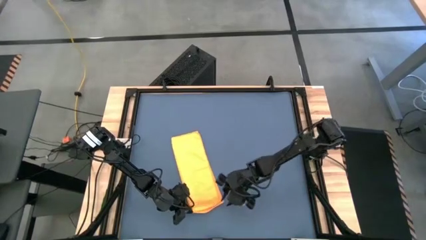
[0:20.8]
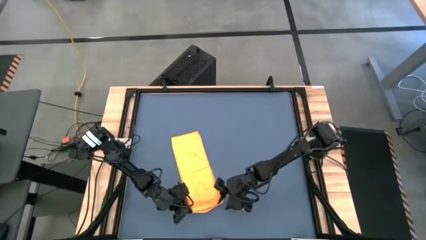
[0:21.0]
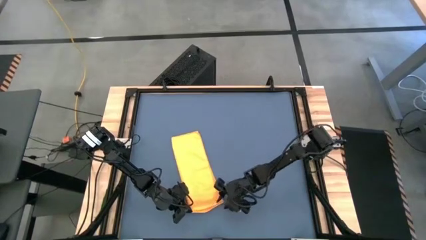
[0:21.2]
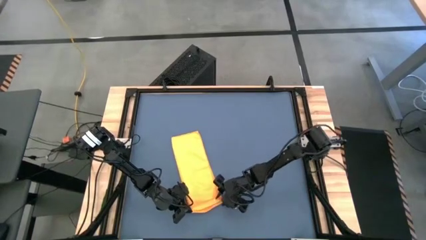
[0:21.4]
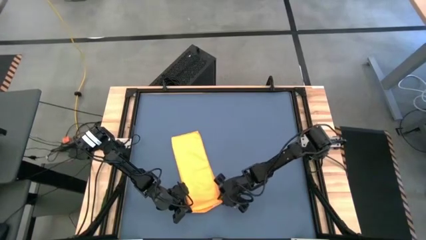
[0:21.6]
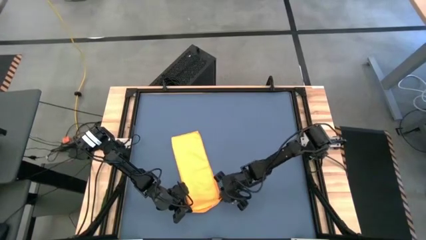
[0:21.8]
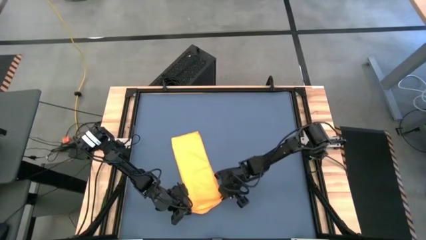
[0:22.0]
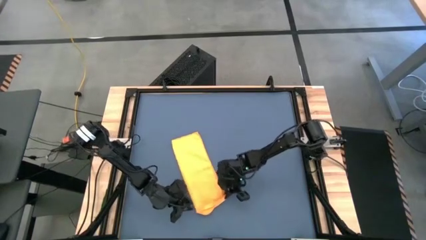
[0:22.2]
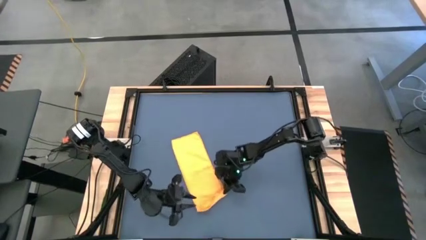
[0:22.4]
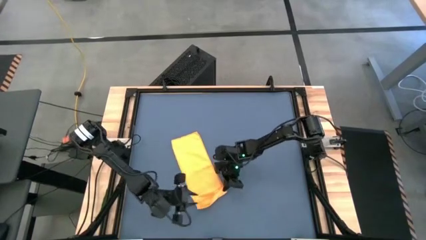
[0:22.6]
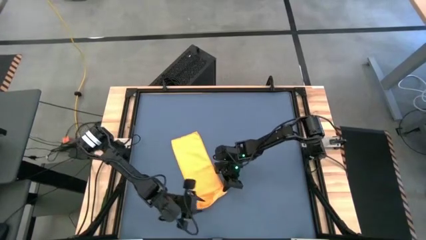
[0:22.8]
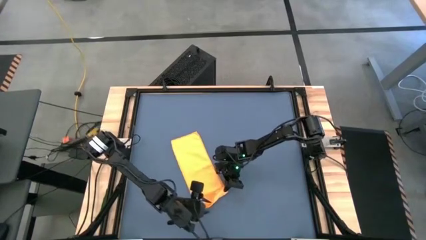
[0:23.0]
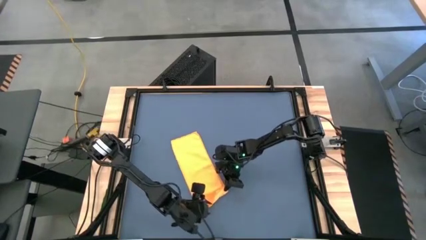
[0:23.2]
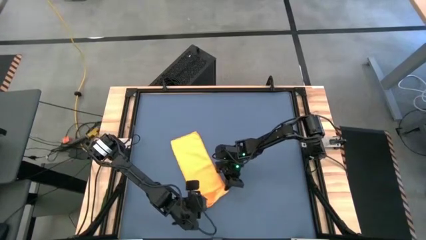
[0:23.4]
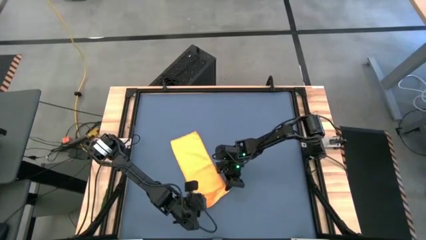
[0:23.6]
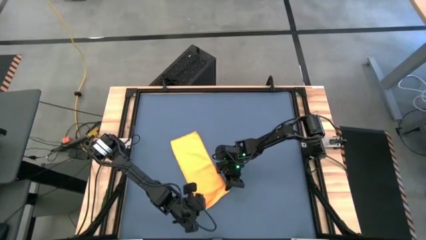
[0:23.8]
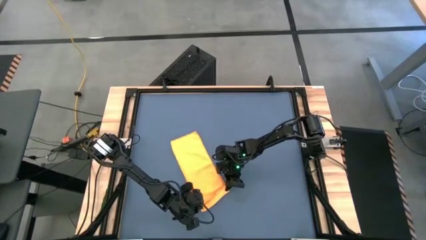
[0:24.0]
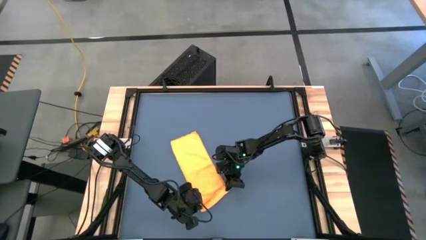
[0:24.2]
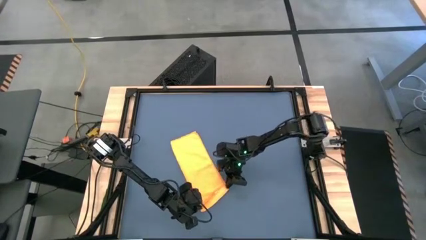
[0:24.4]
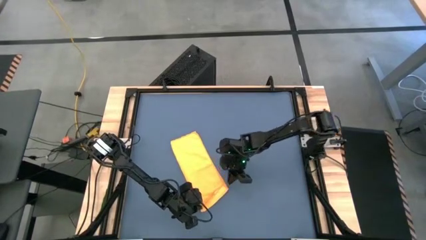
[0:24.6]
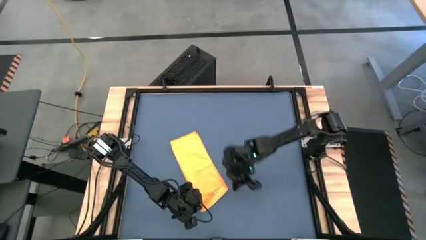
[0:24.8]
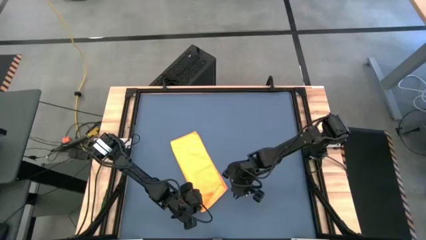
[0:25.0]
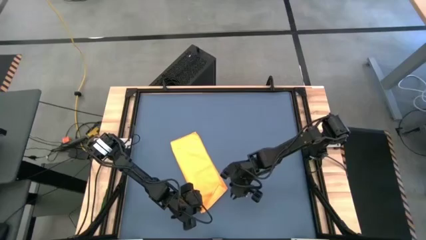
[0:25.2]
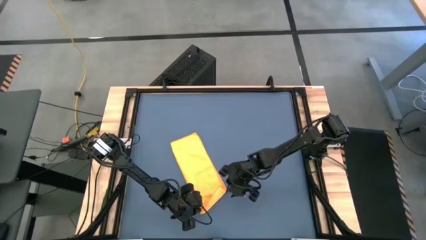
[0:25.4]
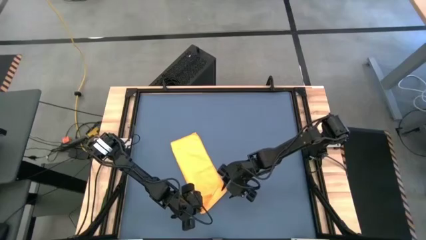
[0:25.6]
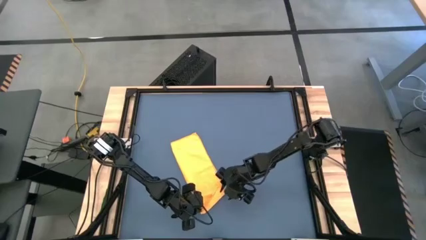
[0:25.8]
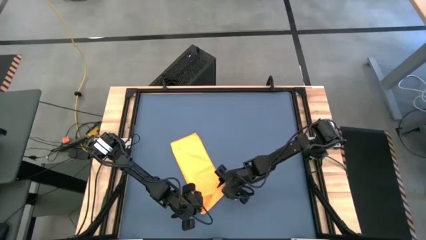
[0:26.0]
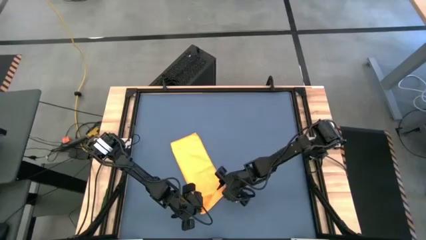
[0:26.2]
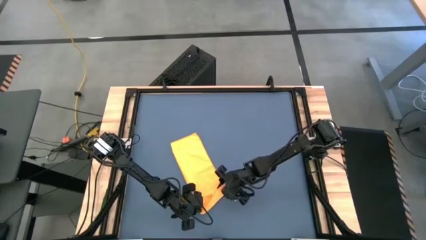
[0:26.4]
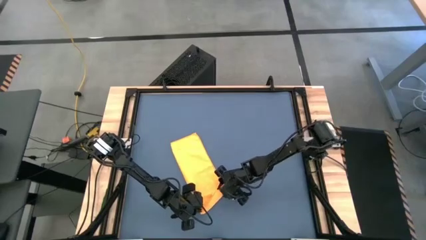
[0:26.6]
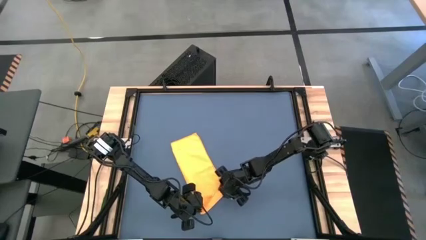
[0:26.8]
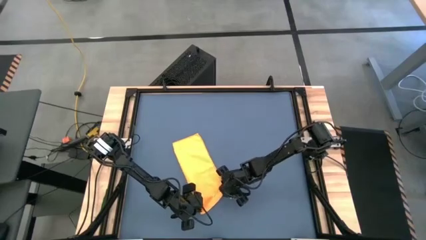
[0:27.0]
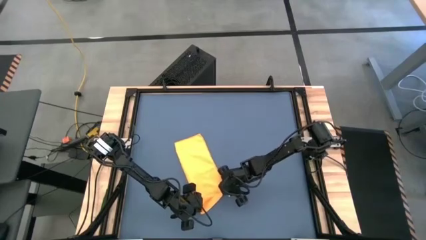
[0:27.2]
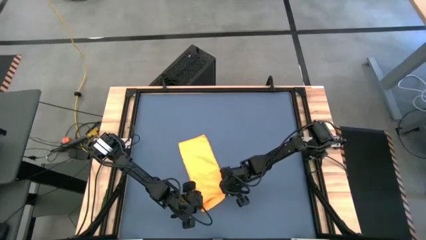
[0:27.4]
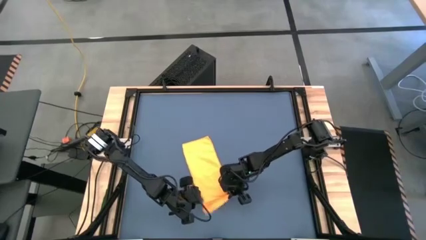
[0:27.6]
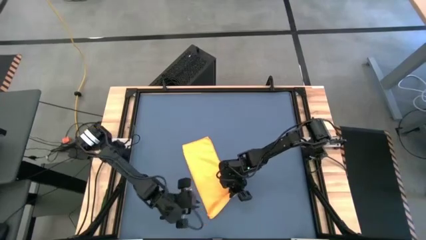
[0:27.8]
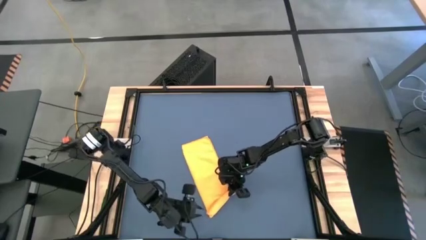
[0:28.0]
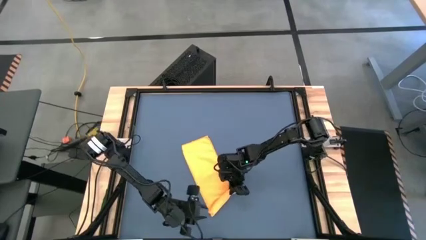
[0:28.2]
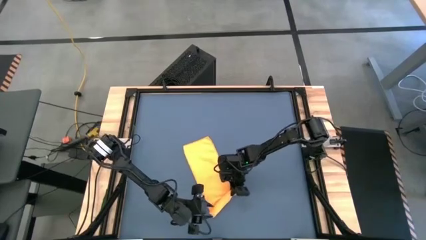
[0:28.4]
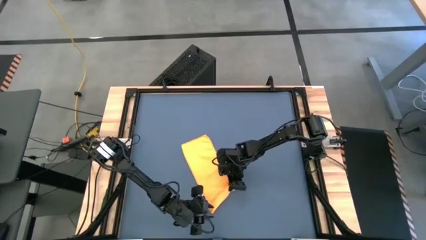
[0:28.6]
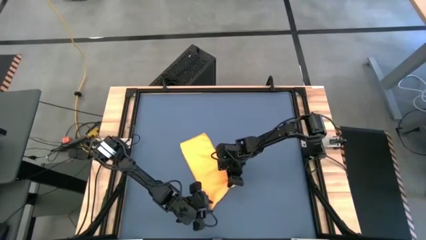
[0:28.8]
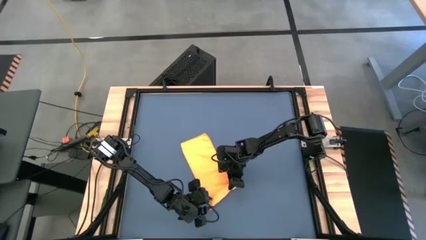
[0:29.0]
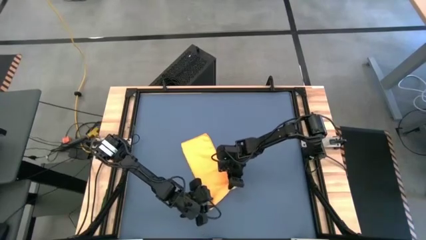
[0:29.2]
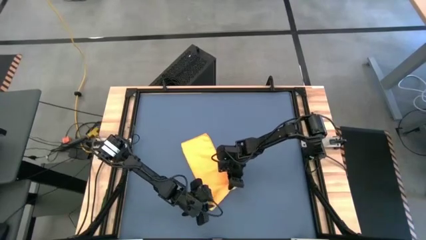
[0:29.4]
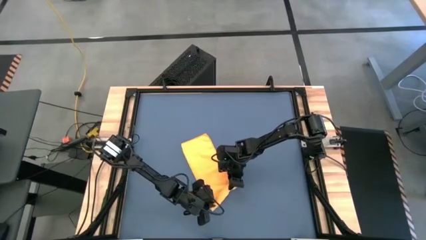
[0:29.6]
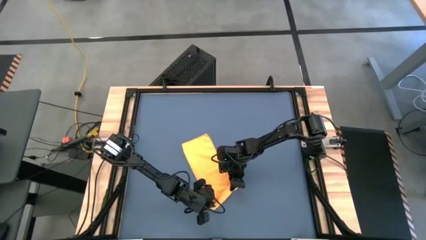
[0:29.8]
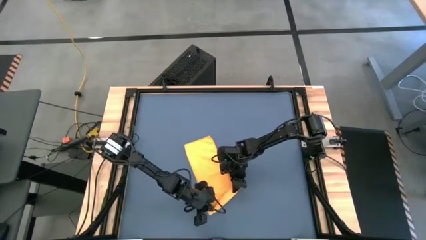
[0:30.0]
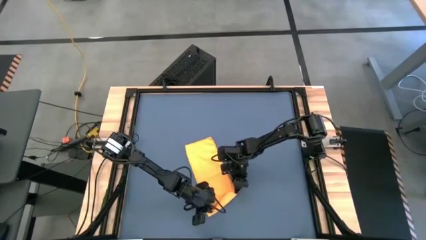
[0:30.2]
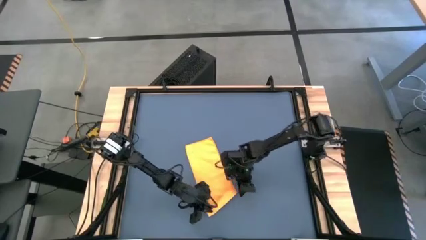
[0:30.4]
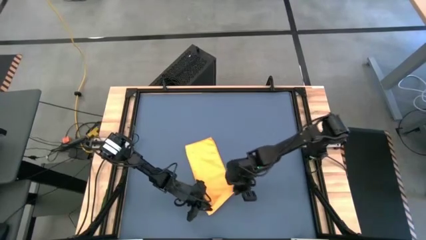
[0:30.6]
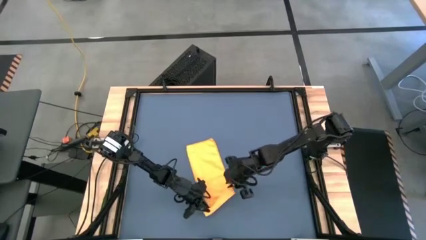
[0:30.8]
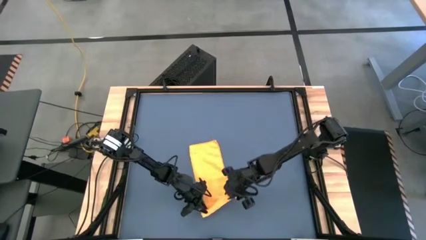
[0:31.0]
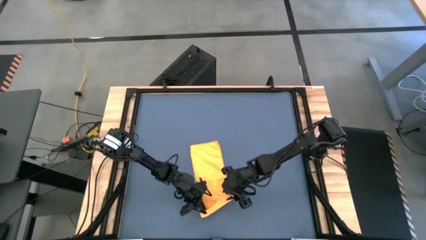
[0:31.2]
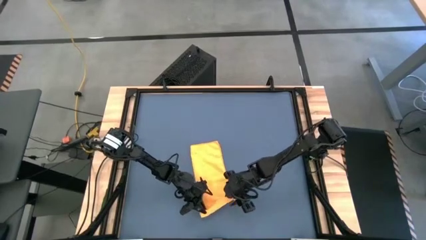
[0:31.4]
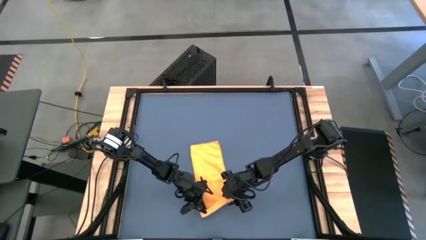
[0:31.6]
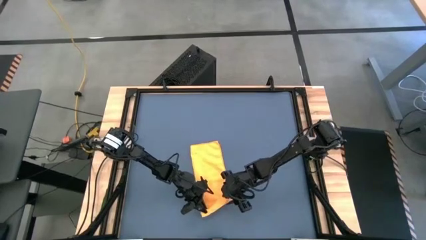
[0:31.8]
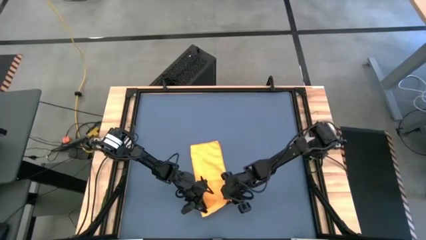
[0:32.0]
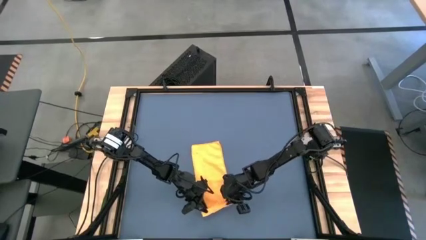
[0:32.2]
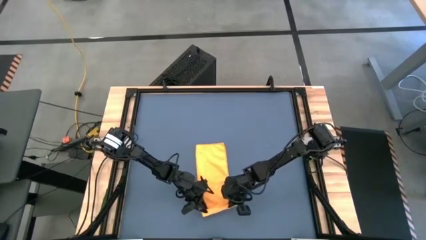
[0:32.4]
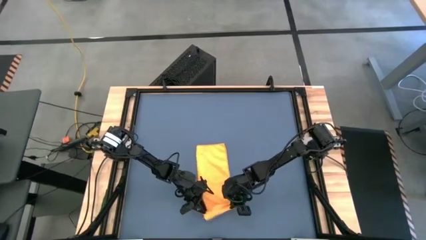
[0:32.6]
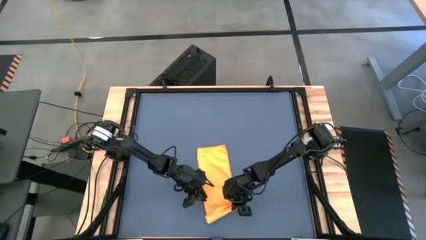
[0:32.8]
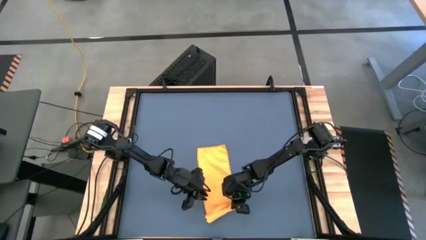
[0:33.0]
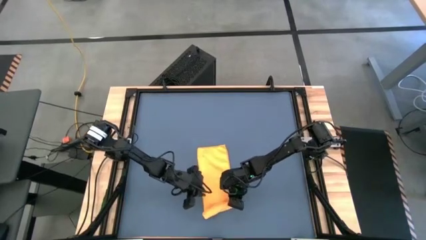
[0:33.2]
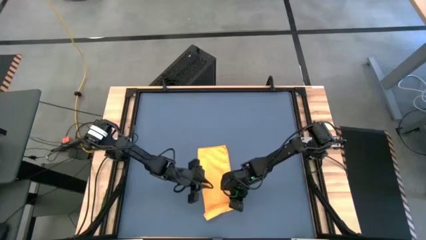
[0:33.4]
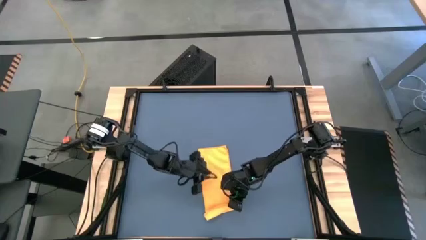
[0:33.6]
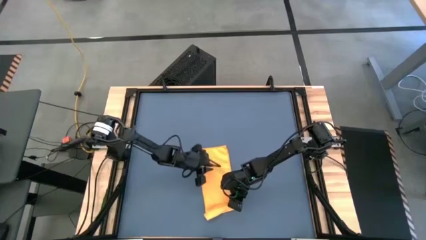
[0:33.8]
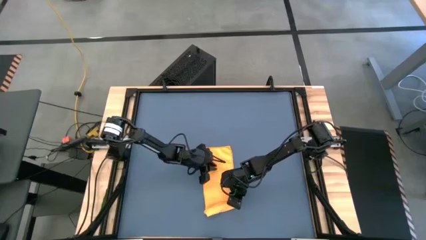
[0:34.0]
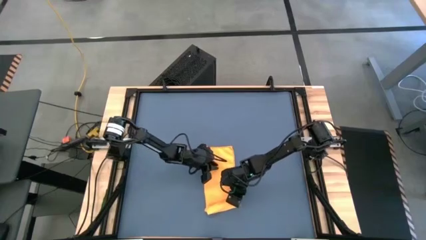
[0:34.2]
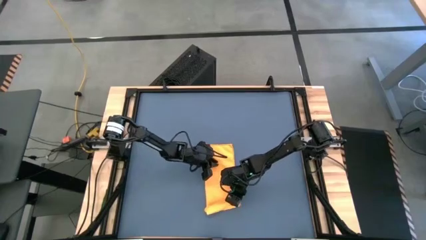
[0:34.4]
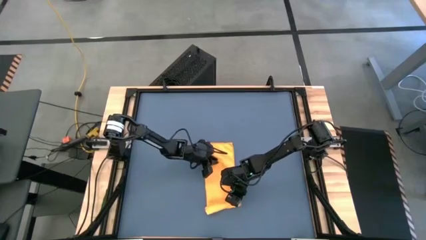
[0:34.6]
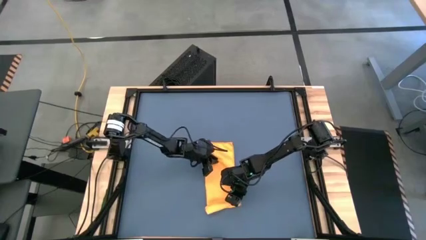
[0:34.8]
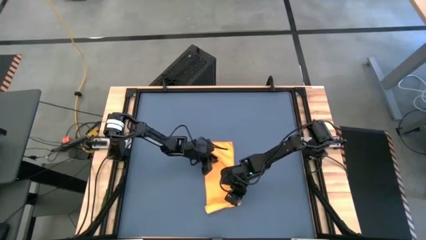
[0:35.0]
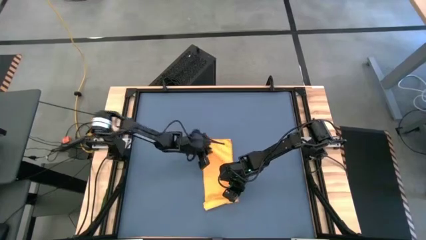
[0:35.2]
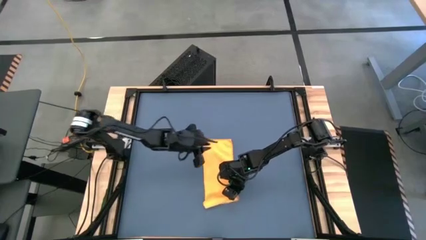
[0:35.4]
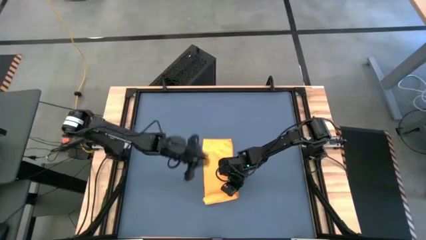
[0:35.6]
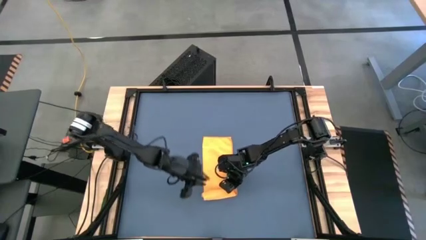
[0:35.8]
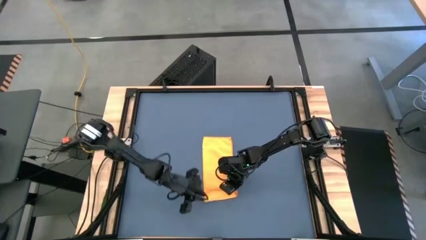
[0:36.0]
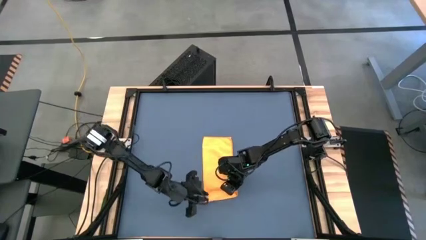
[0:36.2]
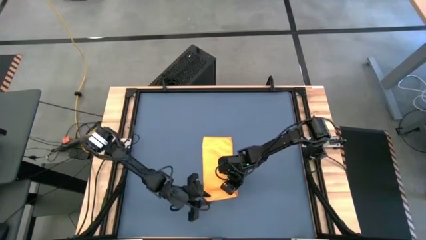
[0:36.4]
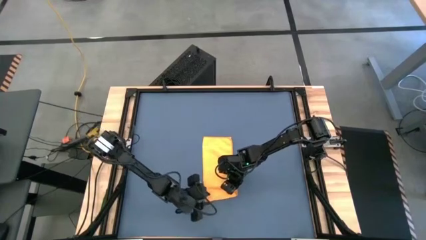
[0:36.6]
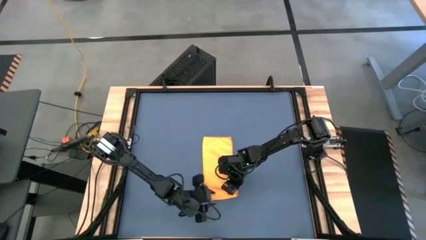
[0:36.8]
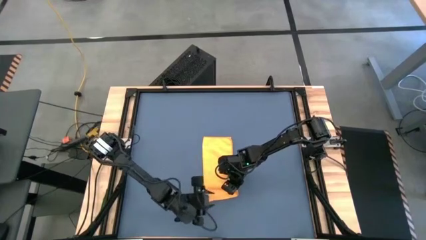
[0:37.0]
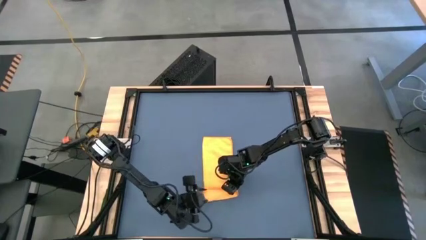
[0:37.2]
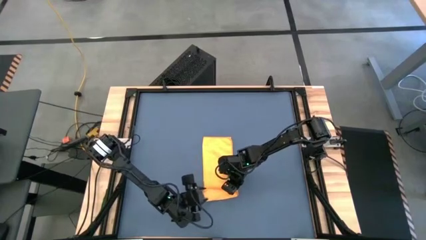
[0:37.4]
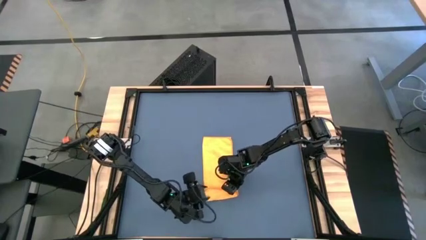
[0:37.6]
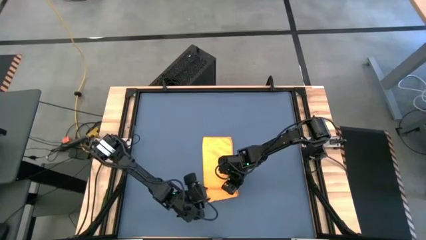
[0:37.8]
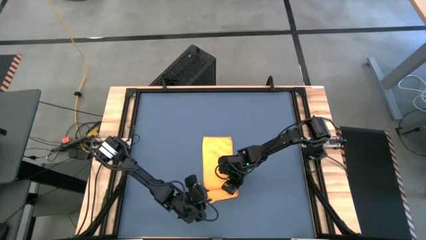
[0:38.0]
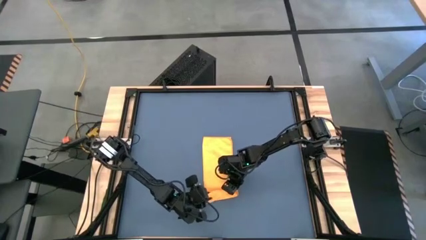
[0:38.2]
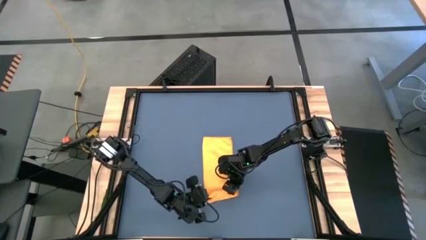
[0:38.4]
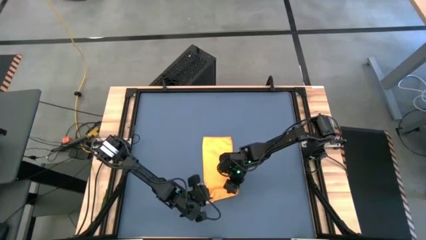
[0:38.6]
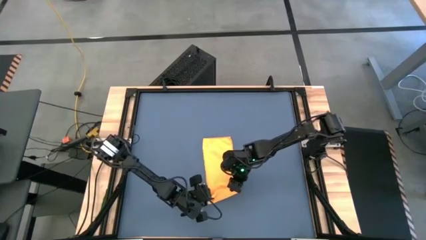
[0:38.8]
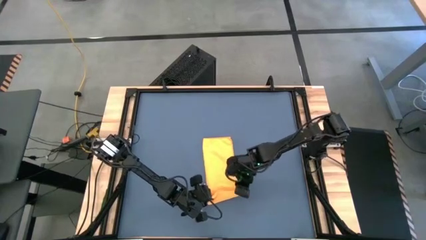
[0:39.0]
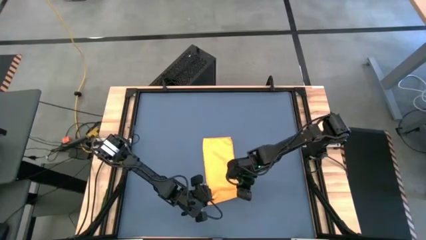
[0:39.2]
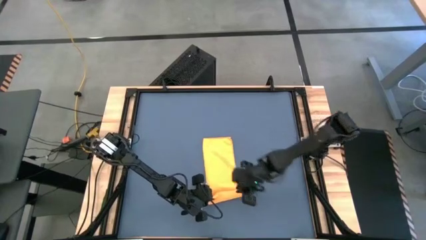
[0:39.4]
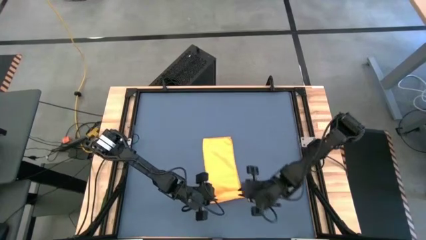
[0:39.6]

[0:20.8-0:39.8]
Task: Roll towel
Roll the yellow microfiber towel
